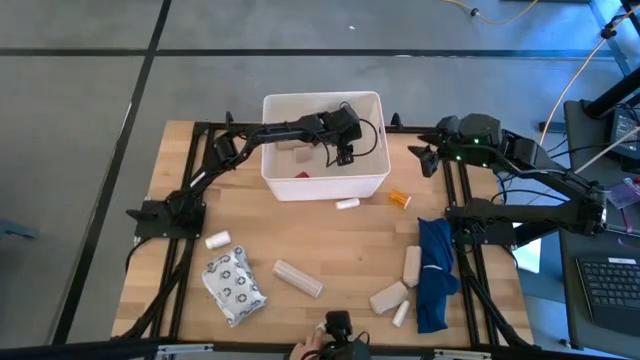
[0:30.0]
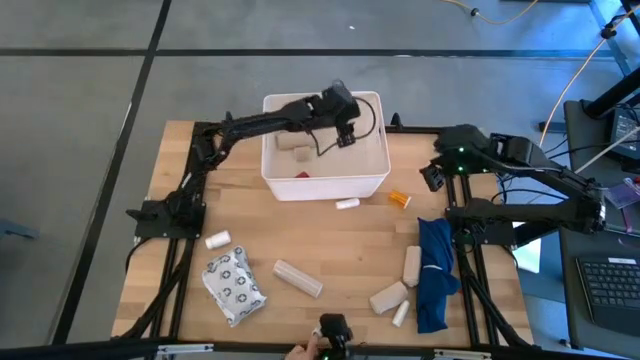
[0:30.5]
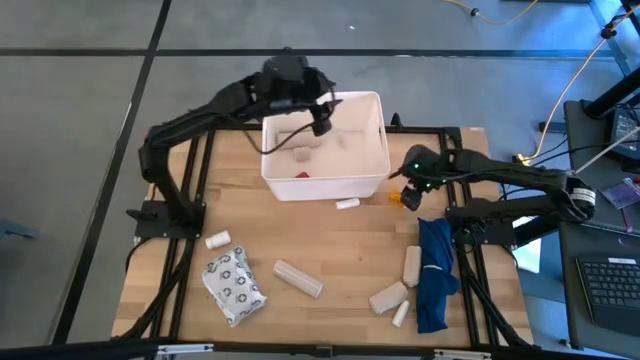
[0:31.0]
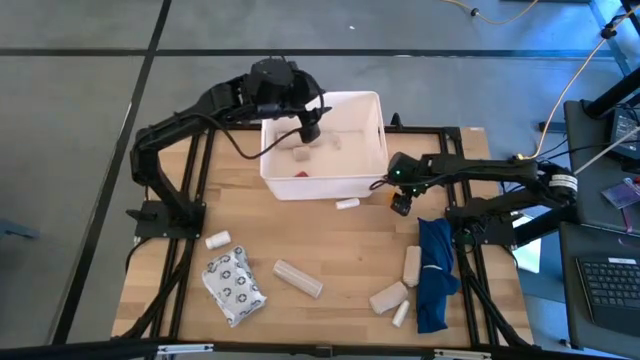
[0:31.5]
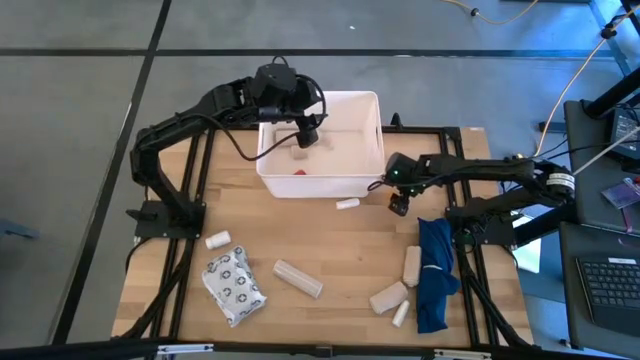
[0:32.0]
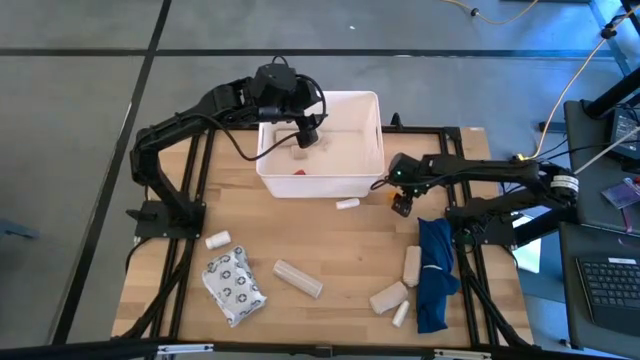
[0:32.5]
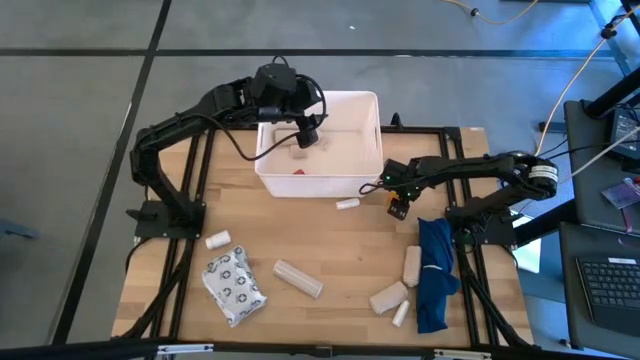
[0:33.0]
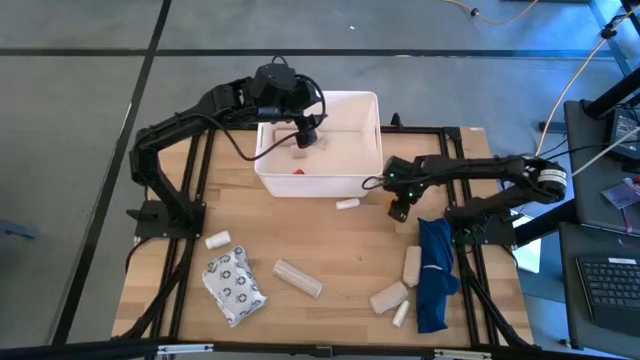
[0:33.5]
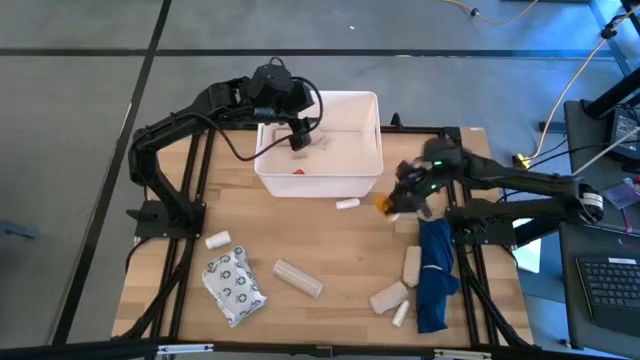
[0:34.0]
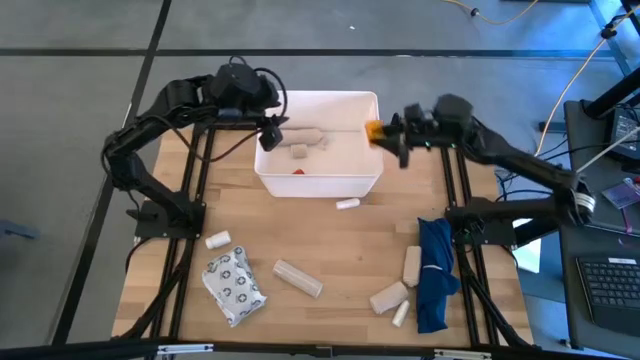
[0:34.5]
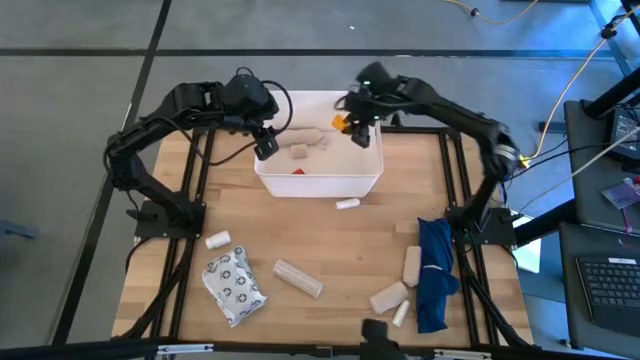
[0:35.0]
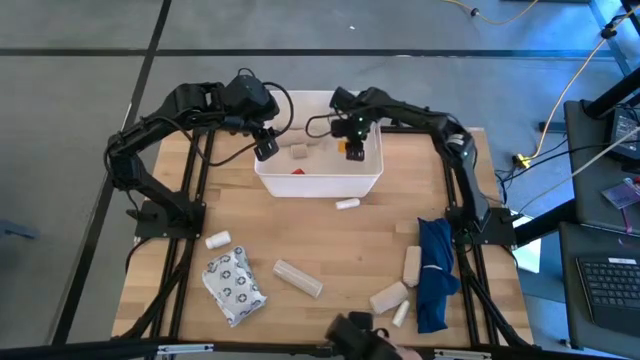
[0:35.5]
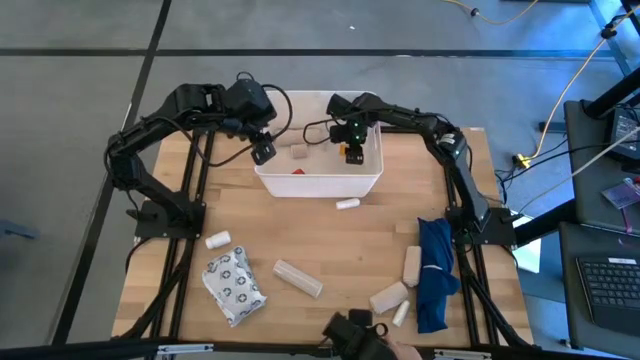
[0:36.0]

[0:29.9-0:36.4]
Task: Pick & place medical supplies in basket/bin
Put the orange pill bottle into the white bin

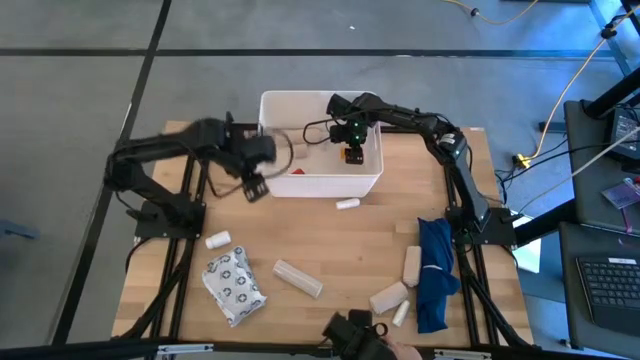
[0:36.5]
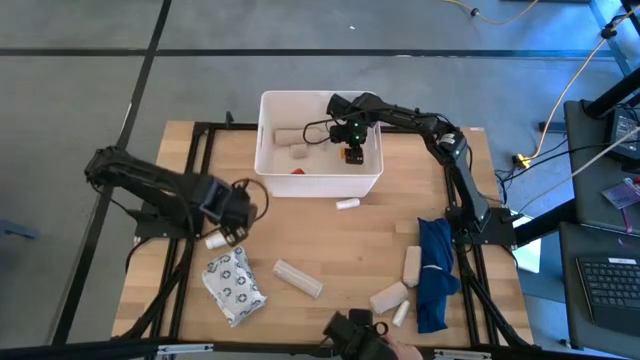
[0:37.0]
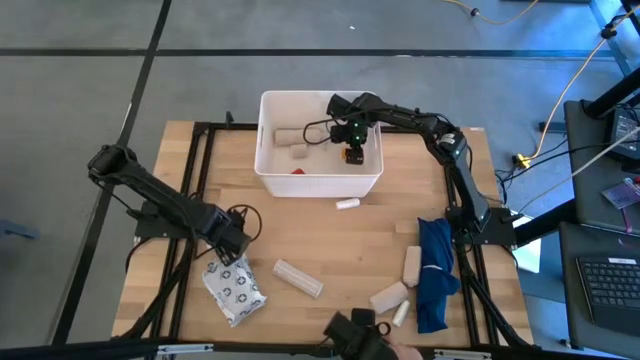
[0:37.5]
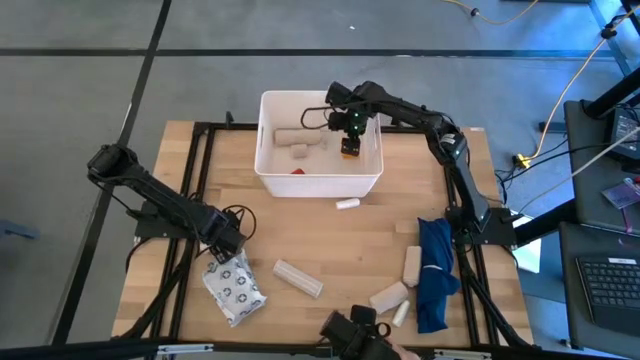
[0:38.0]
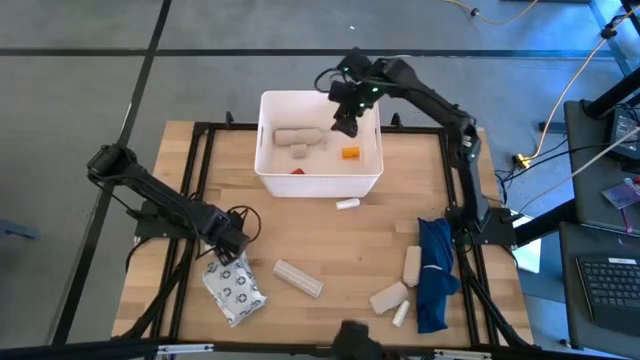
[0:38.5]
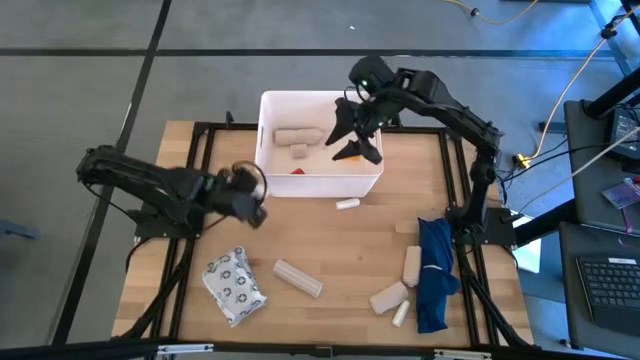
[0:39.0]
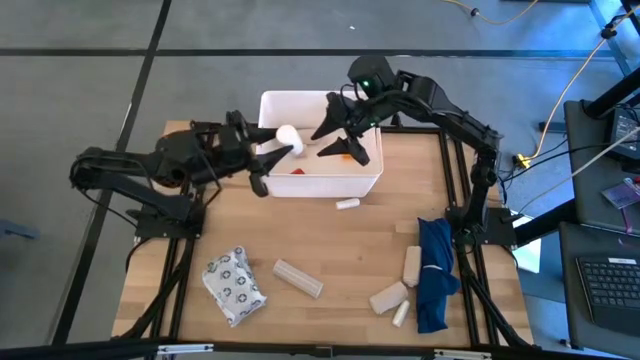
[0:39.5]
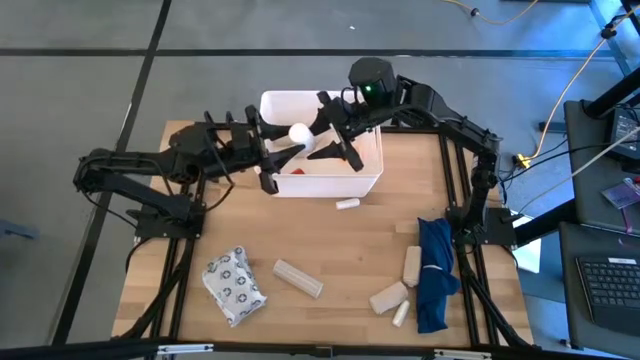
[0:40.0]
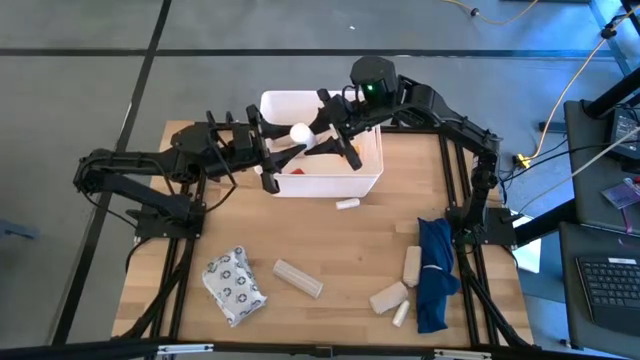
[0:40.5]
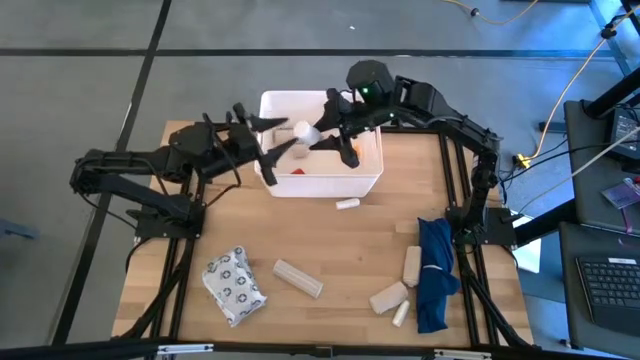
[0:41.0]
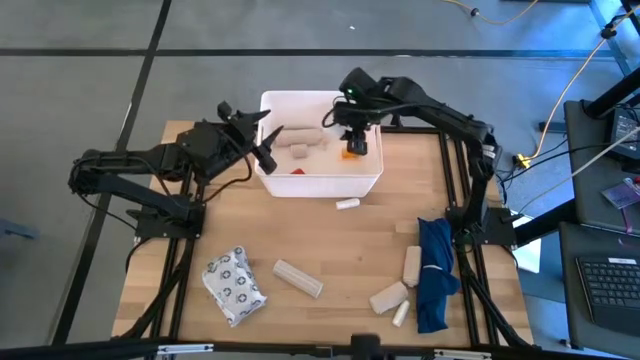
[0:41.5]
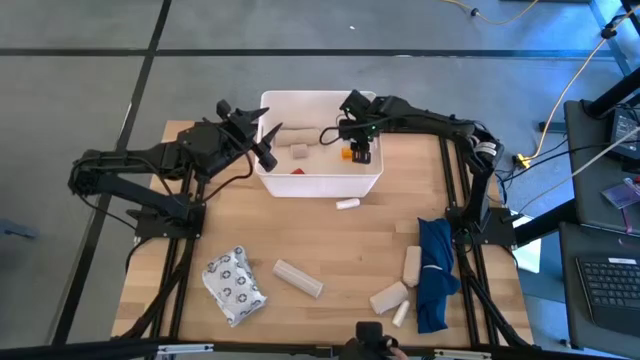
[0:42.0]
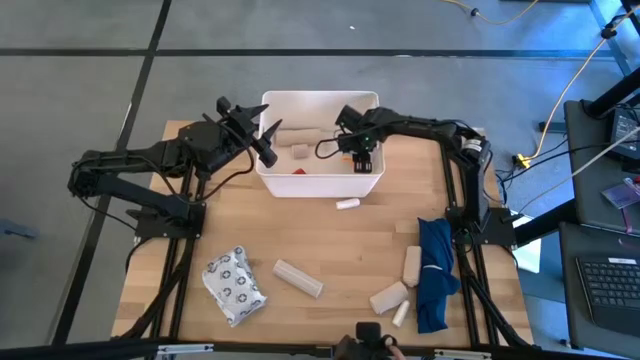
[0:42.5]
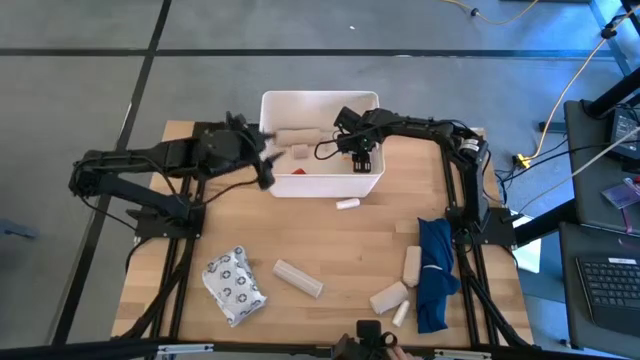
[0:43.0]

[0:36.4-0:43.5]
Put the white pill bottle into the white bin

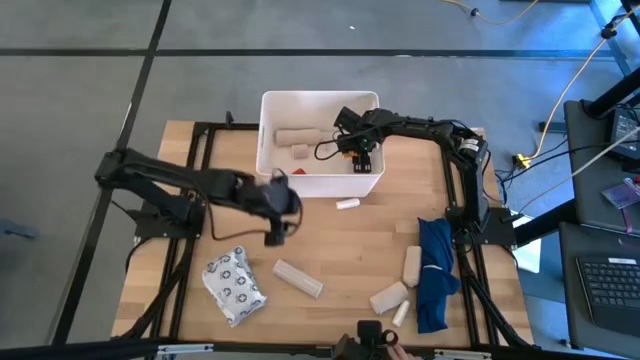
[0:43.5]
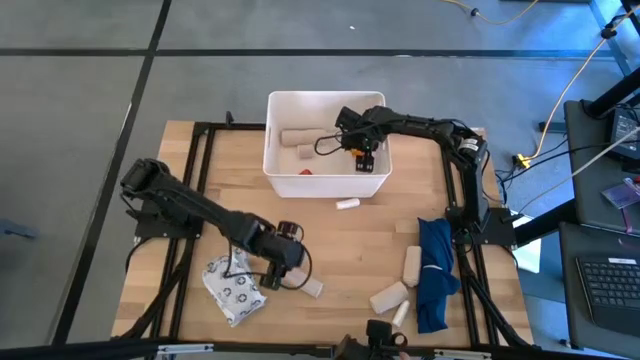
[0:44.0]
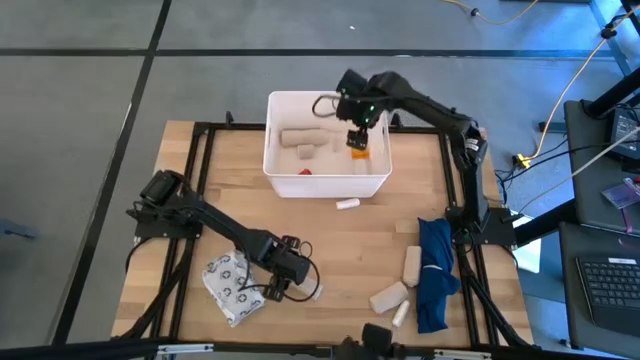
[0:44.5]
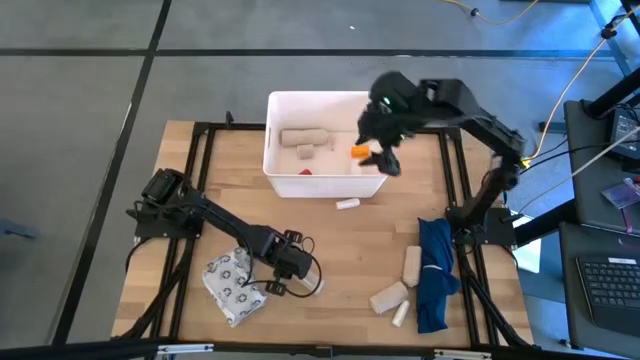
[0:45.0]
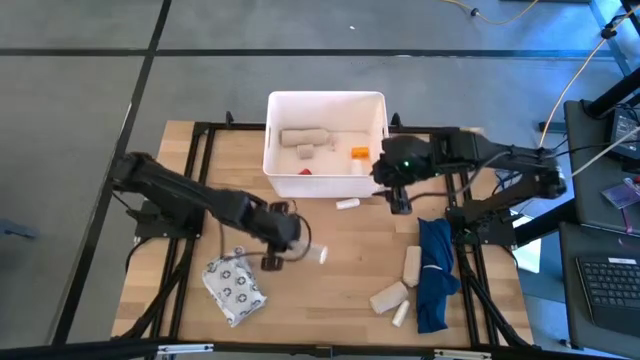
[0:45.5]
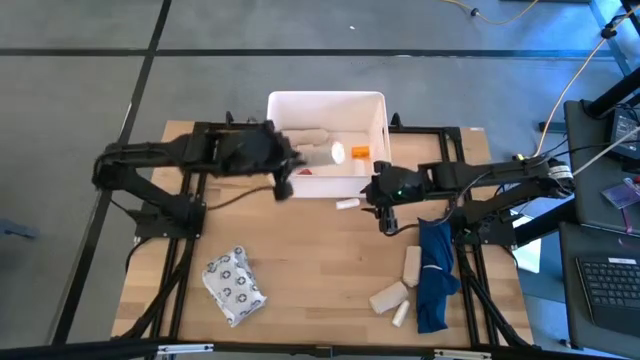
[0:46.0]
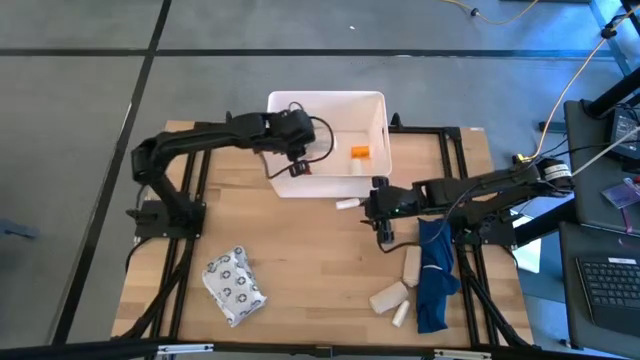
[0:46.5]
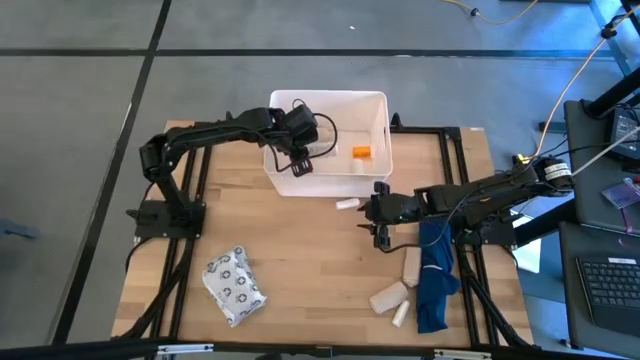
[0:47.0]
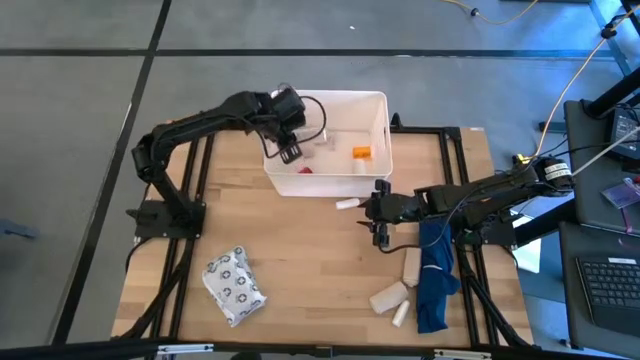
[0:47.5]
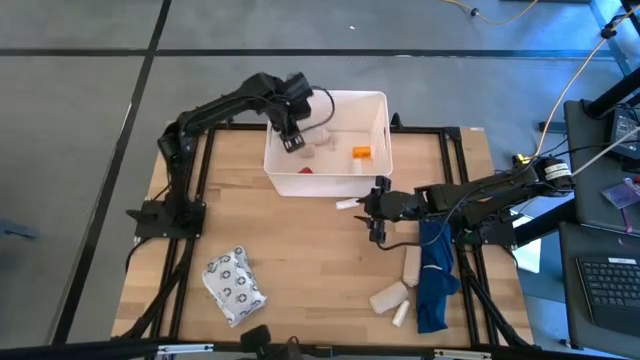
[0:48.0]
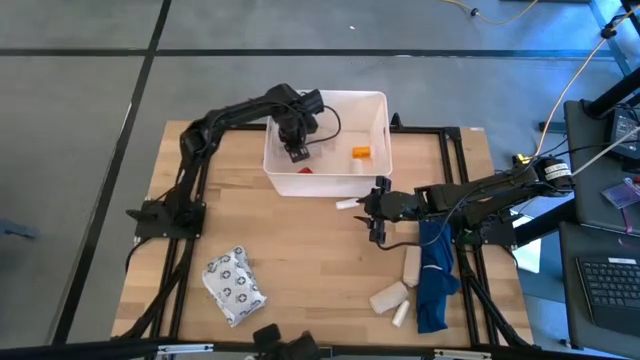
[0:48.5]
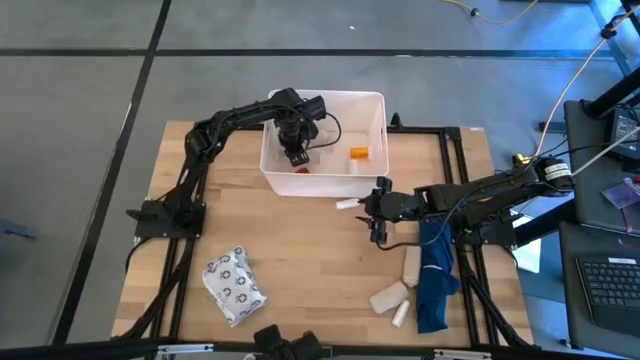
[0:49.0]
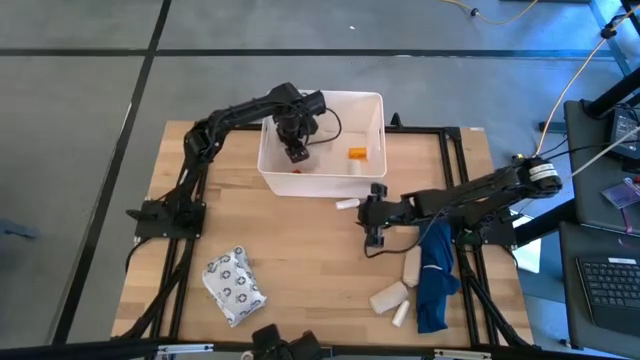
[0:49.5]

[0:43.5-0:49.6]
Put the white bandage into the white bin

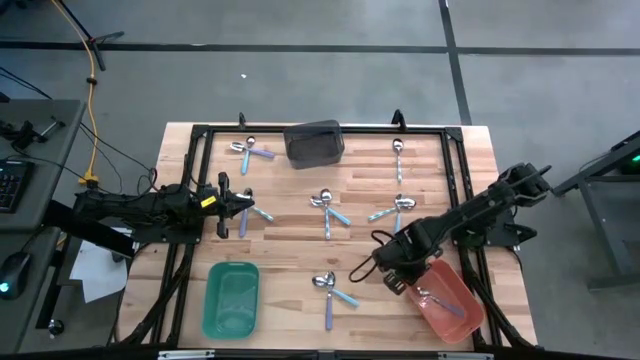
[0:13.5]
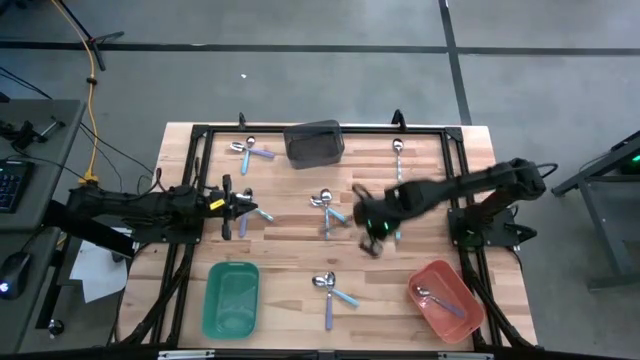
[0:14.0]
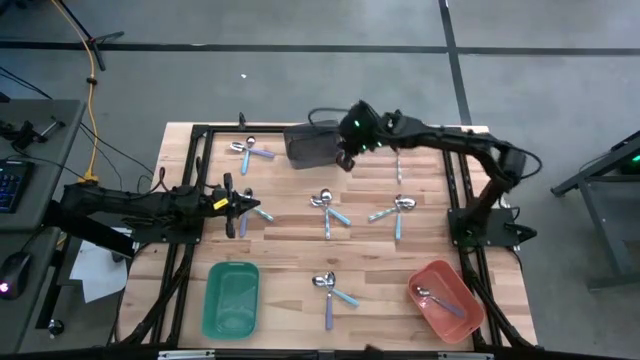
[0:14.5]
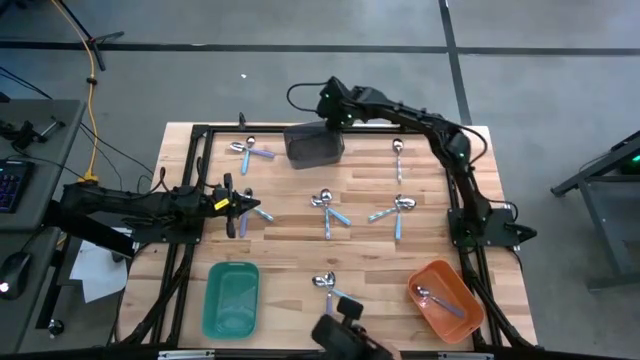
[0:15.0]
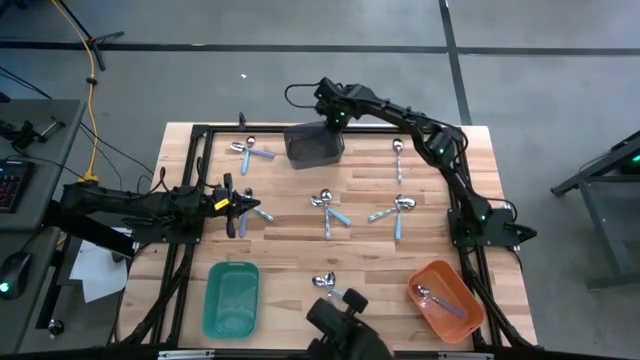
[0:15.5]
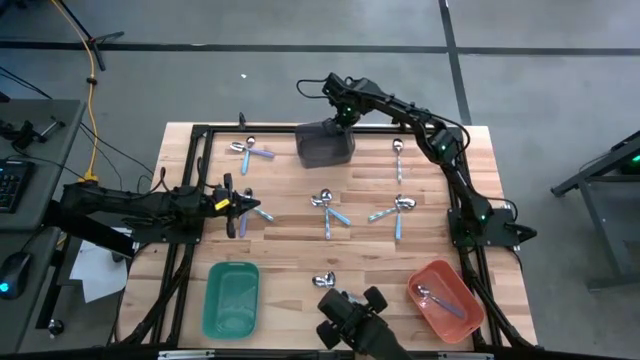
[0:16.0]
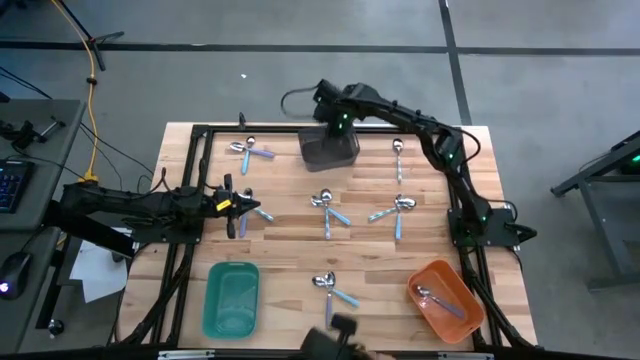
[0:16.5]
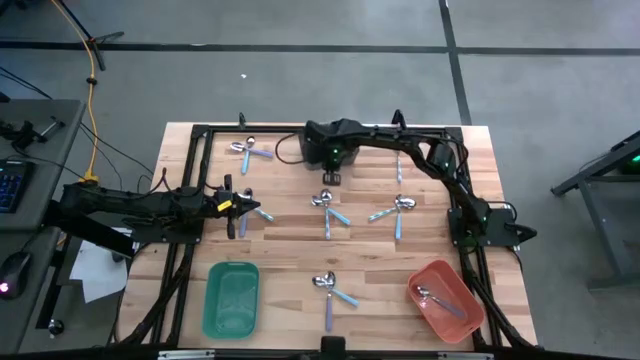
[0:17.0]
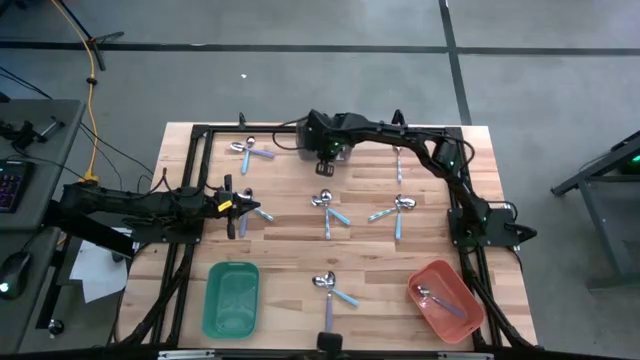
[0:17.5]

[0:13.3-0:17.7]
Task: Sort silverware by color (type)
Adjust the black bin
